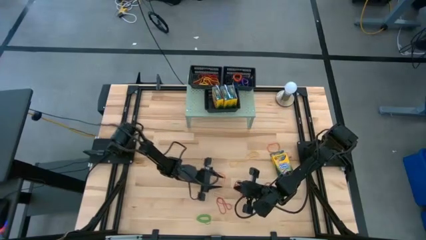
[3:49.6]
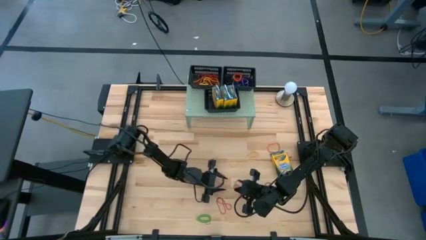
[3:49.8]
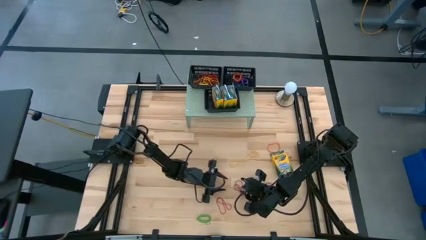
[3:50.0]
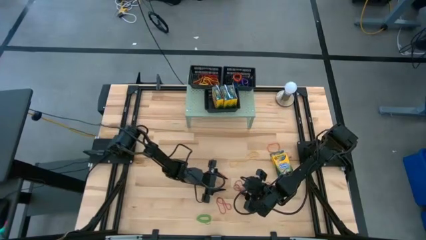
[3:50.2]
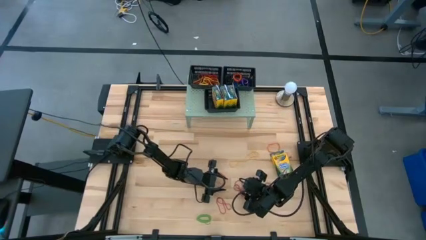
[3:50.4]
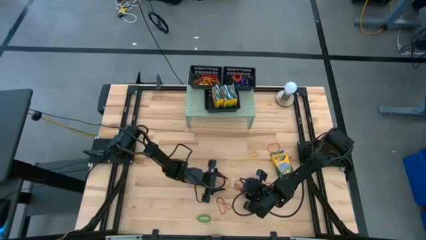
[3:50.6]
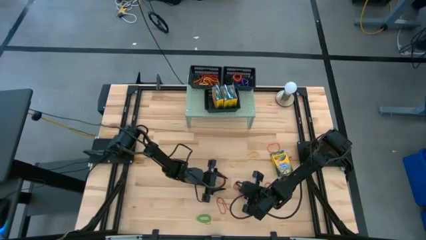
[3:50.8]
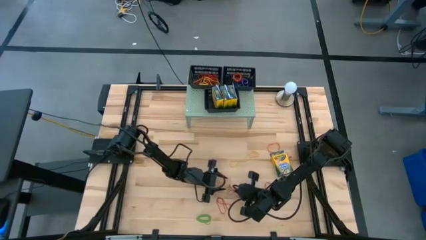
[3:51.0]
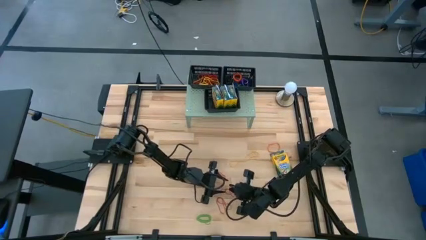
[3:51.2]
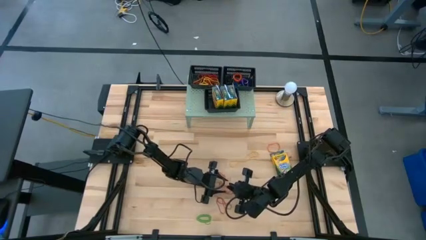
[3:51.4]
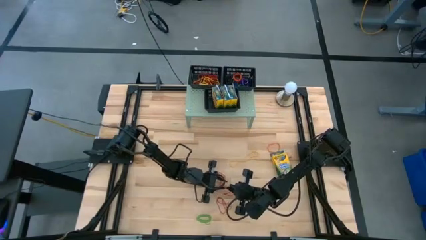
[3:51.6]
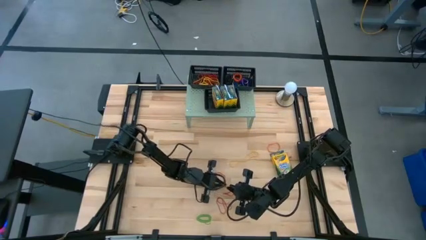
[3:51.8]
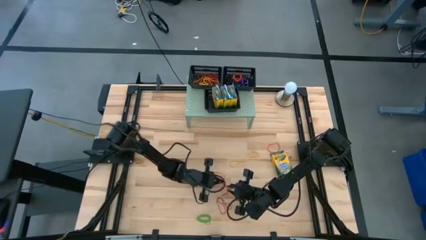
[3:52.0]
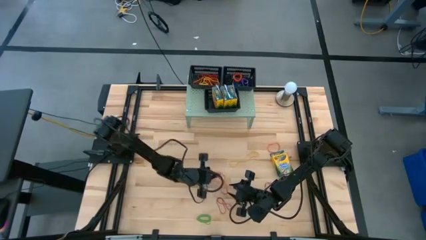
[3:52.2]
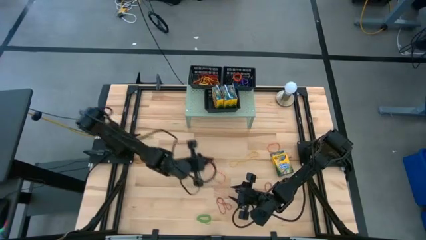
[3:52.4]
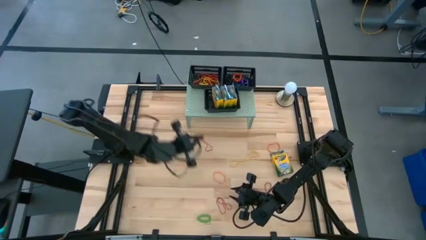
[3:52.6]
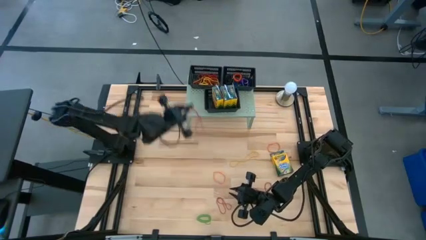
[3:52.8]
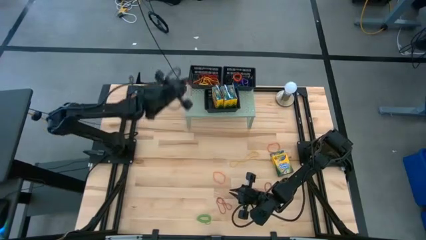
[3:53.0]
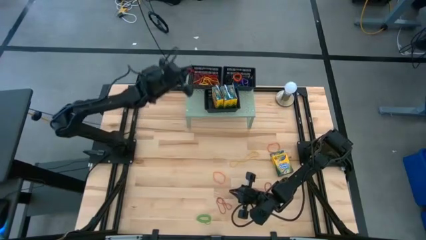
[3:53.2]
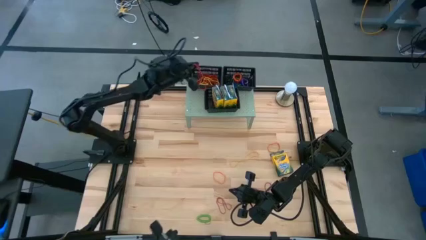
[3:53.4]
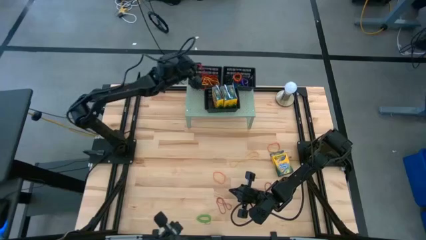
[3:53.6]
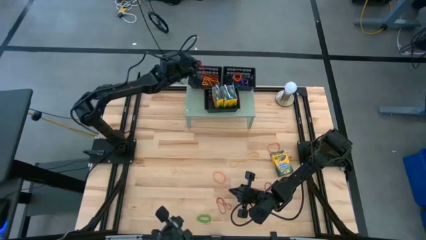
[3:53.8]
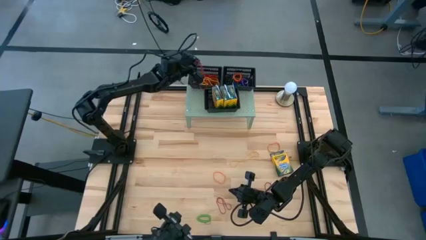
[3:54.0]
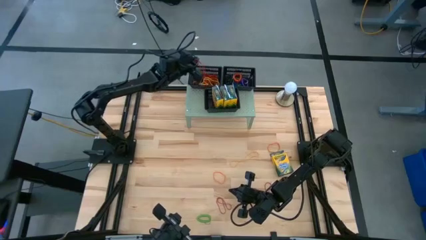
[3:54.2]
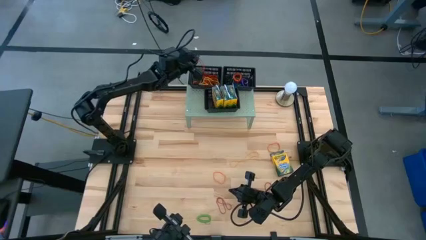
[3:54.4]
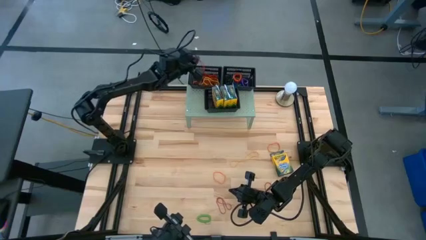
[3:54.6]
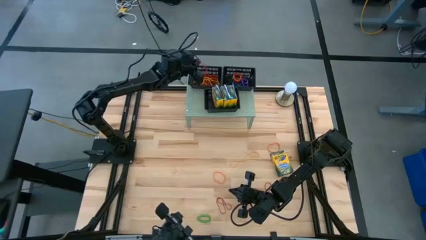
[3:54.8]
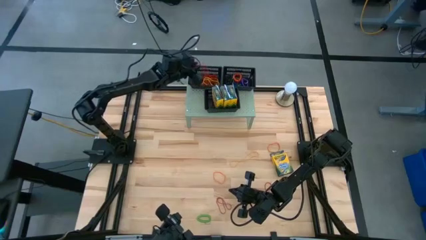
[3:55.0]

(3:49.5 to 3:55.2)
Task: Pick & Place Office Desk Supplies
Put the red rubberband into the top left black bin

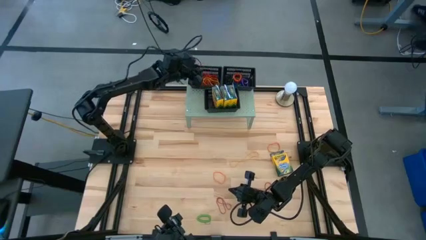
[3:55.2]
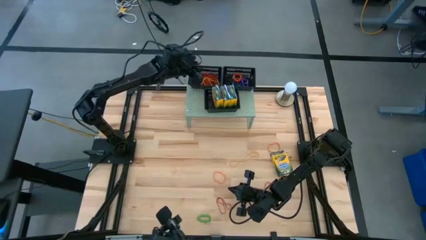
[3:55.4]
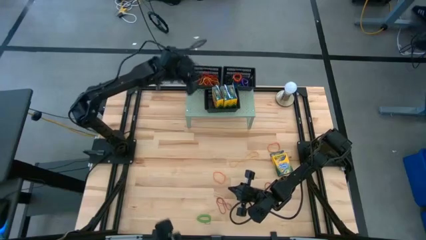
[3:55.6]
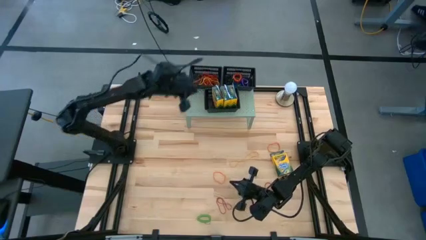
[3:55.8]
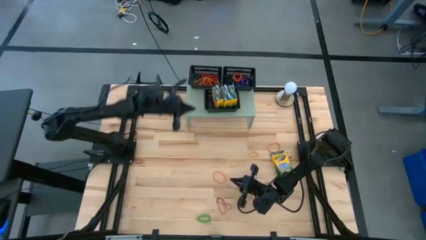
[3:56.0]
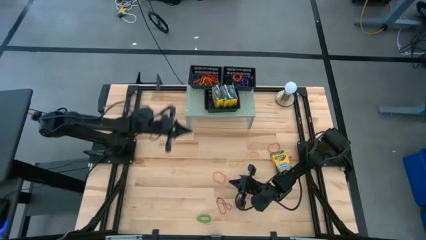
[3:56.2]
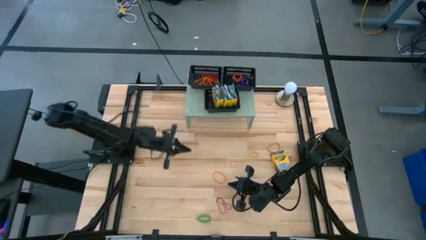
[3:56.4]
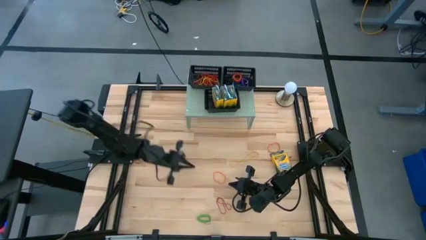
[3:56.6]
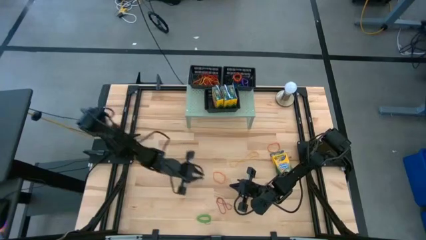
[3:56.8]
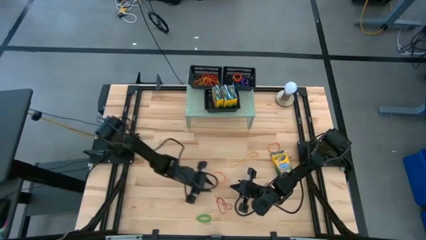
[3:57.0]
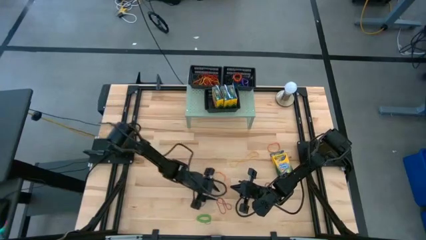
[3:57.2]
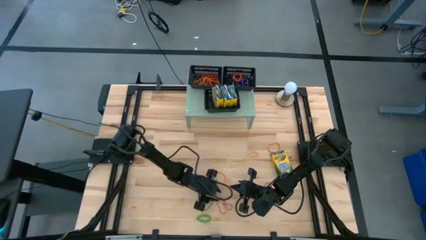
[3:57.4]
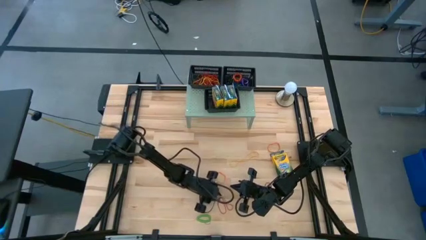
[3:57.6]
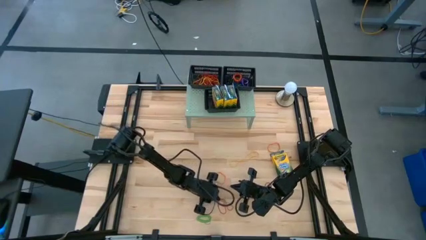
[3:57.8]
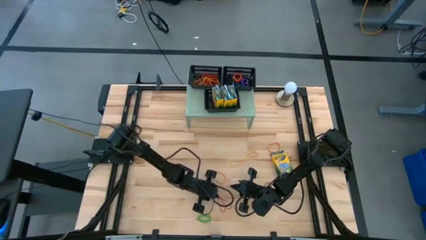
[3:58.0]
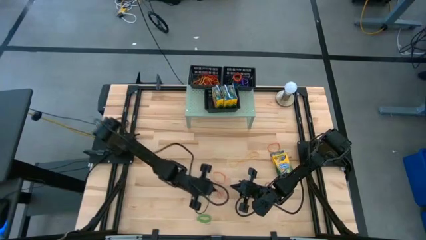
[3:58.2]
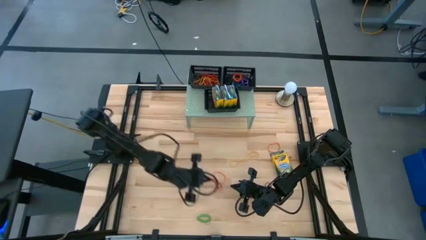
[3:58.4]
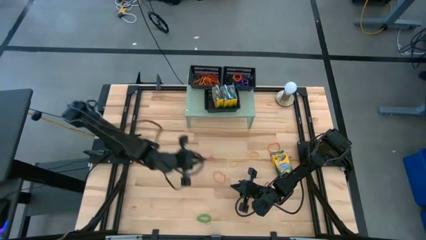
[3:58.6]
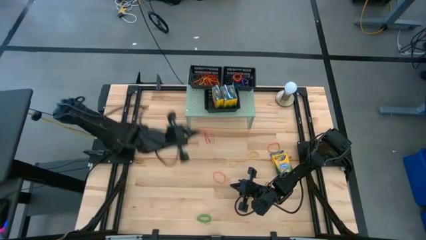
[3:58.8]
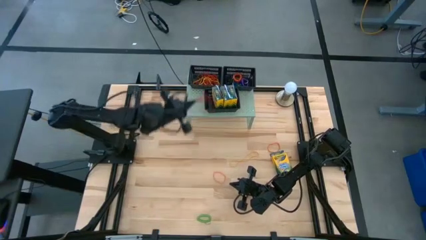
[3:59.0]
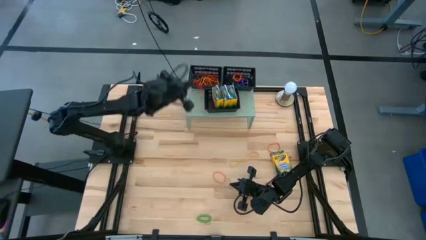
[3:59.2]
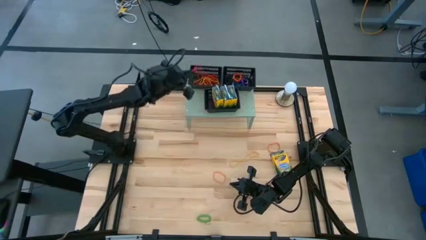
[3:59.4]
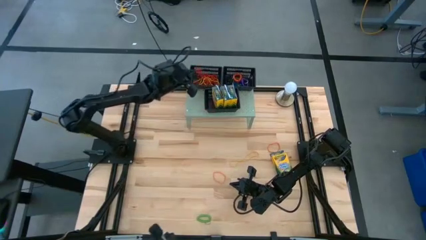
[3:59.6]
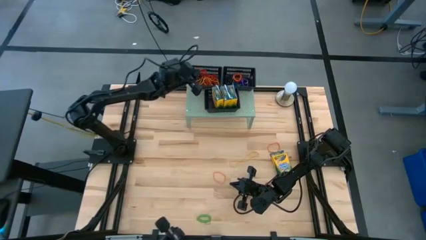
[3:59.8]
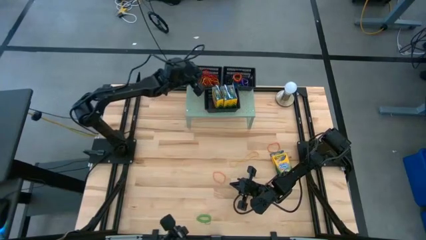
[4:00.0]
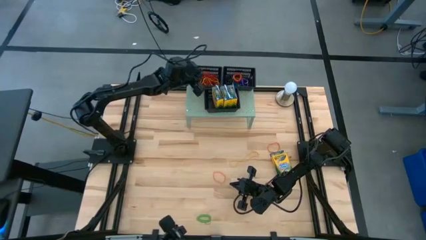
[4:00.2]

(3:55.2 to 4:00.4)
Put the red rubberband into the top left black bin

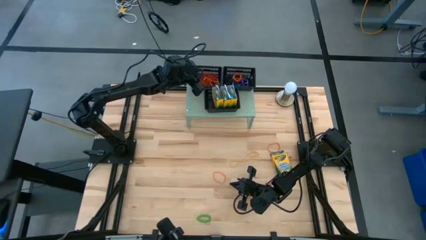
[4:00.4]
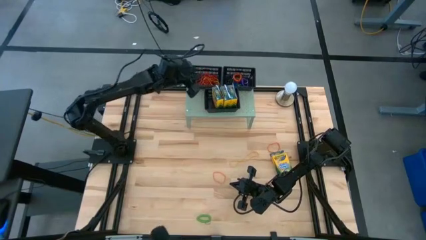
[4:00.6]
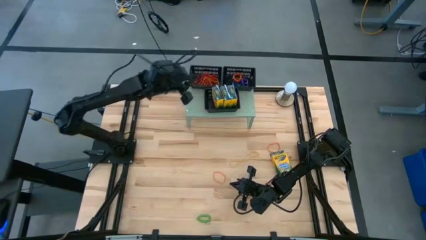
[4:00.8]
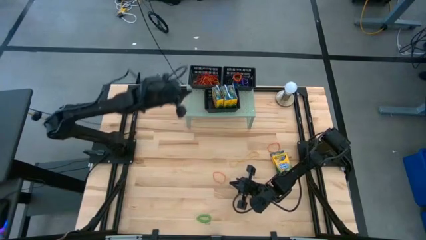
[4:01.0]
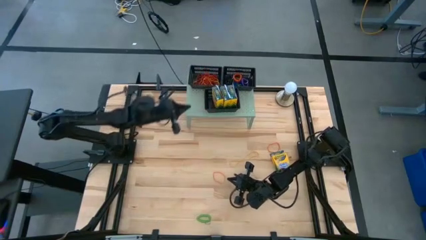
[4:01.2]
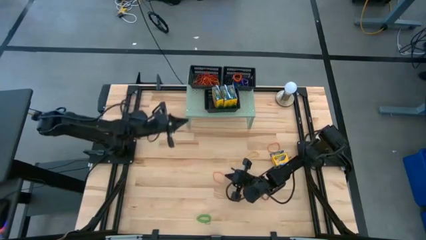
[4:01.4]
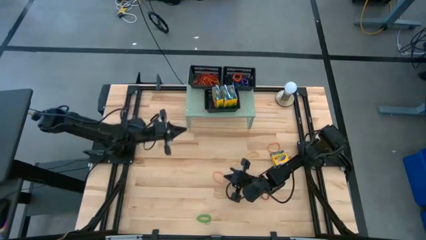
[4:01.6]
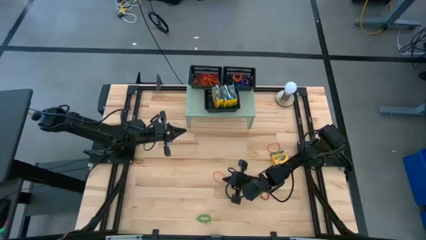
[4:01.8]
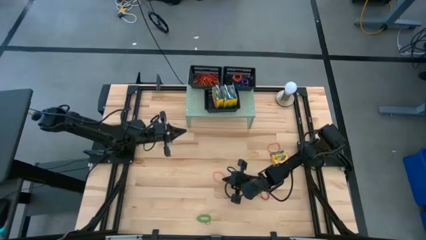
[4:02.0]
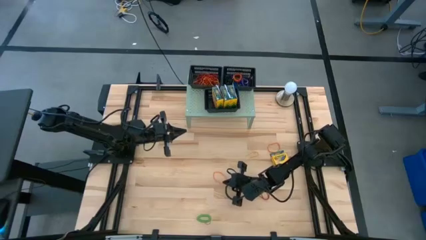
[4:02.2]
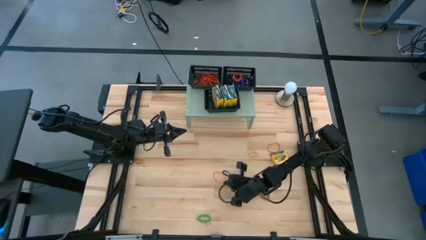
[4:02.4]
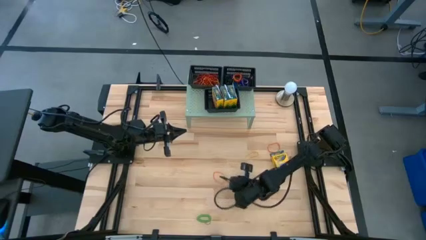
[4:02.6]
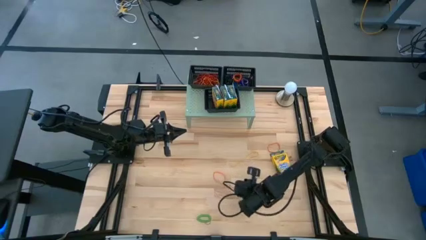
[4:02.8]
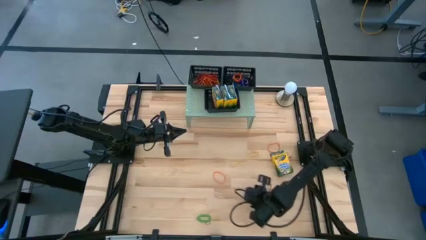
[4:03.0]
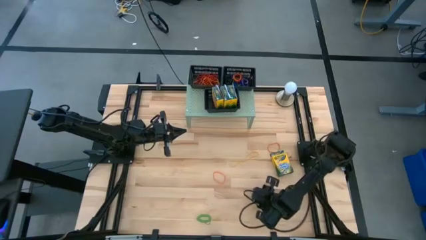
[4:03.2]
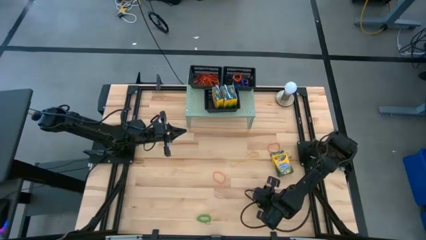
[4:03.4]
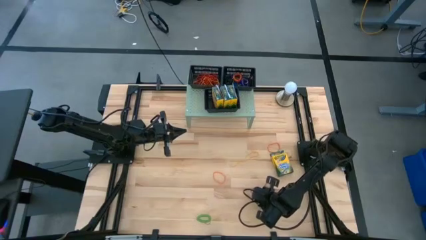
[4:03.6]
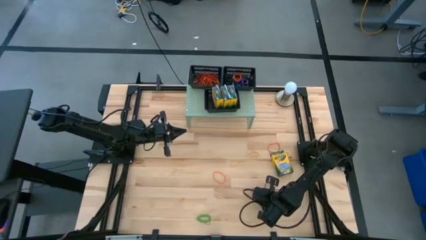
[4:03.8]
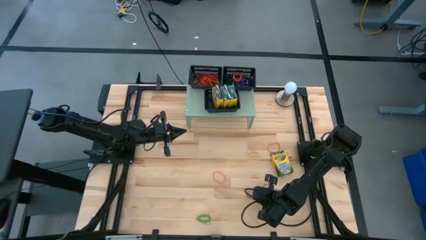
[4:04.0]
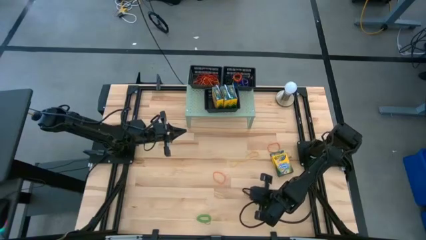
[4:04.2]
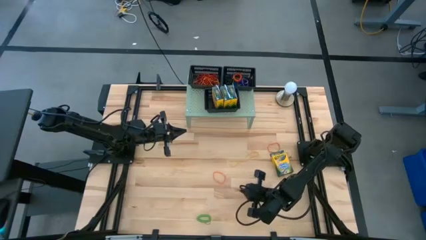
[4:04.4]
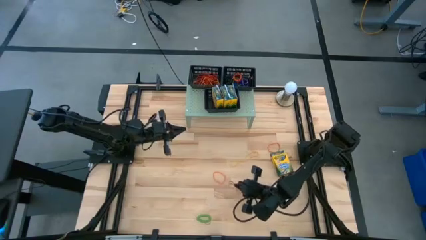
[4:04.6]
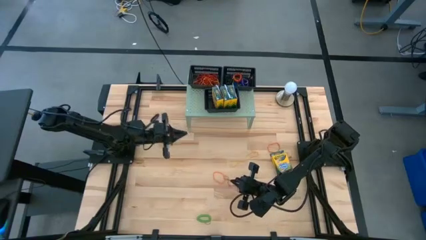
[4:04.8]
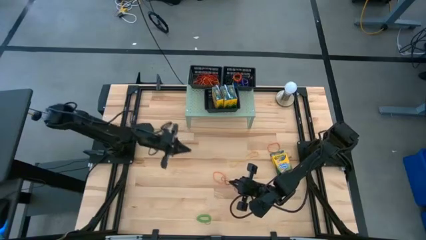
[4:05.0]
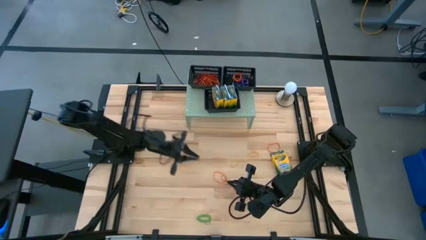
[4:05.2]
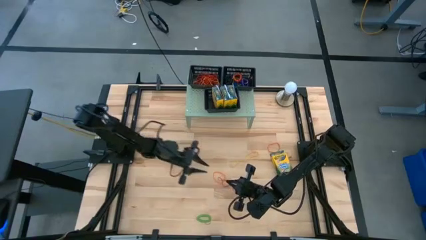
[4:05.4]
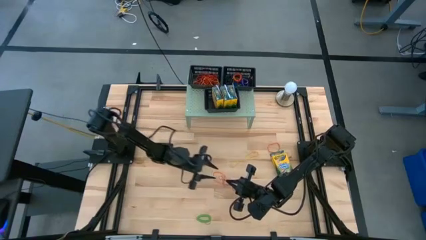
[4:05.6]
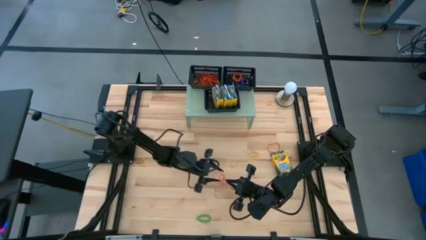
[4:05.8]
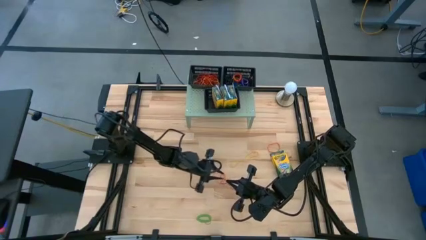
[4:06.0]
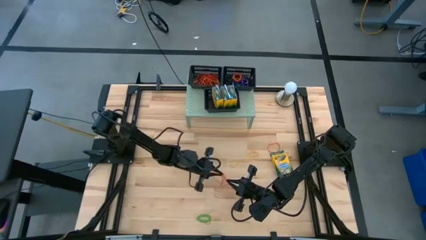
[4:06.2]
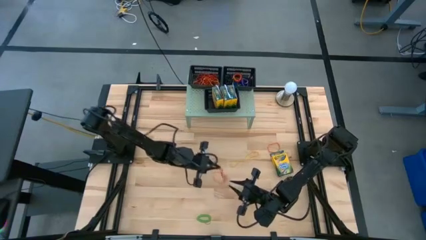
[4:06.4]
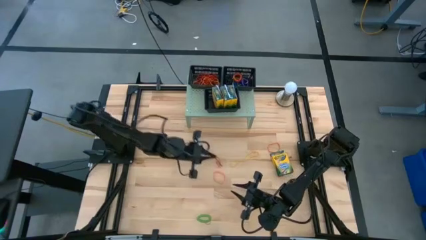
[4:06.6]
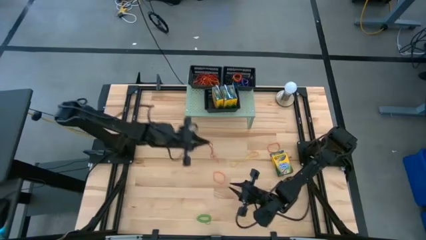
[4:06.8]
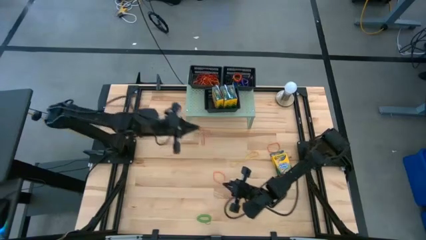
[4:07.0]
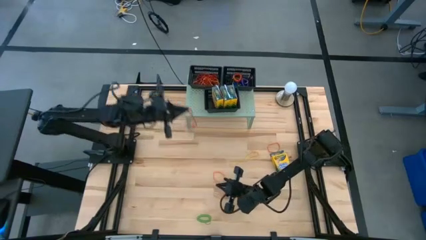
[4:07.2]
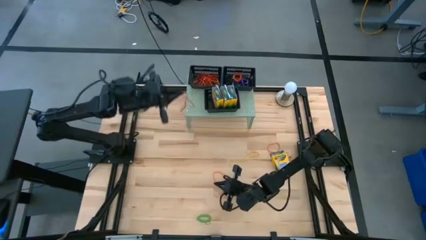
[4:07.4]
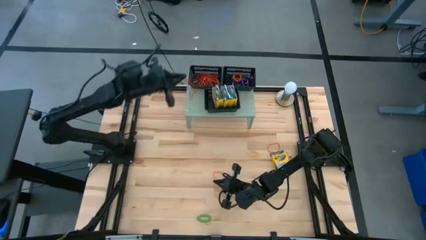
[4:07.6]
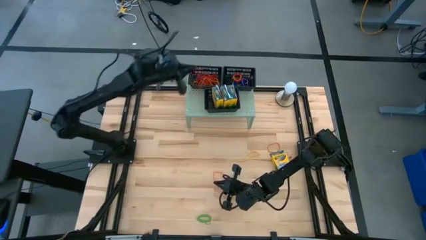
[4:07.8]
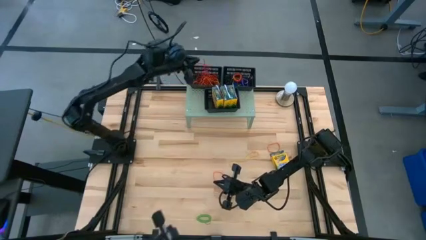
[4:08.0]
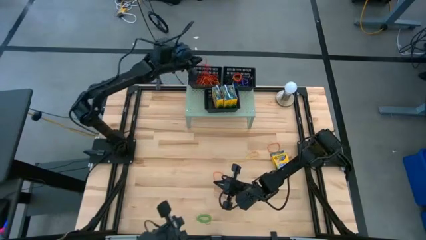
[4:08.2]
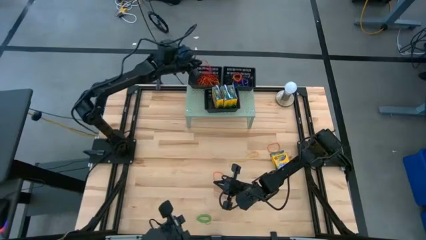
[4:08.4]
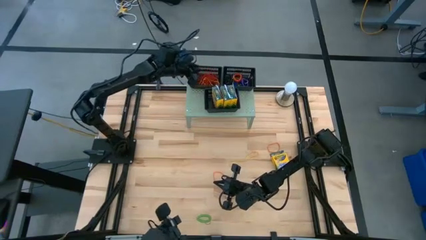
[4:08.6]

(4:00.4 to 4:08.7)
Put the red rubberband into the top left black bin
